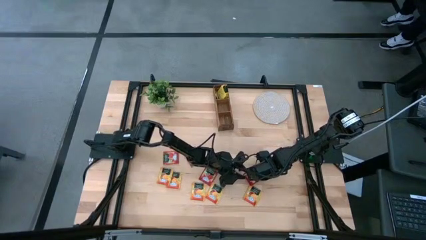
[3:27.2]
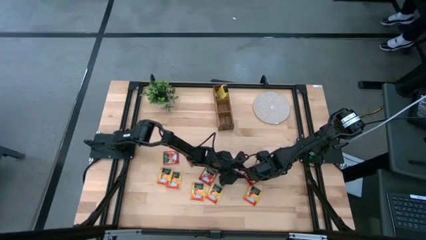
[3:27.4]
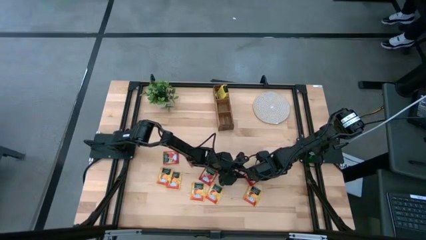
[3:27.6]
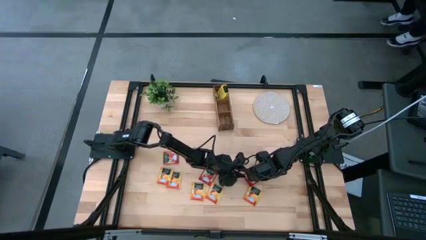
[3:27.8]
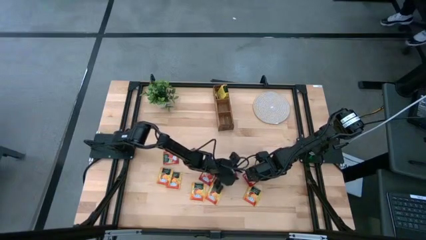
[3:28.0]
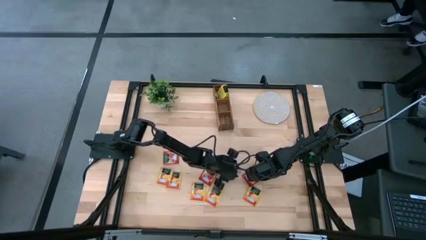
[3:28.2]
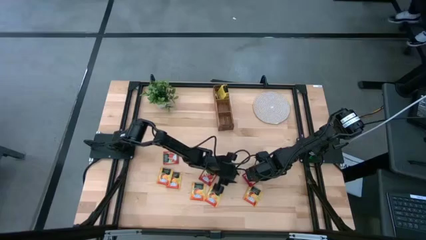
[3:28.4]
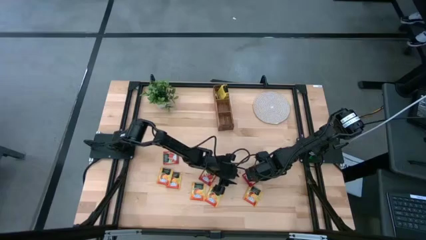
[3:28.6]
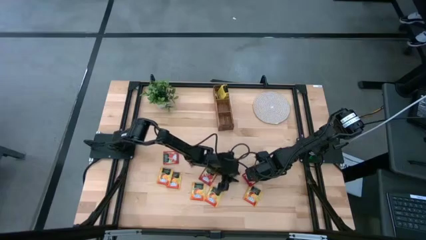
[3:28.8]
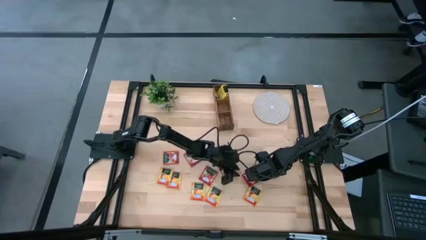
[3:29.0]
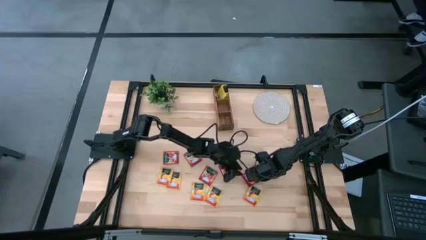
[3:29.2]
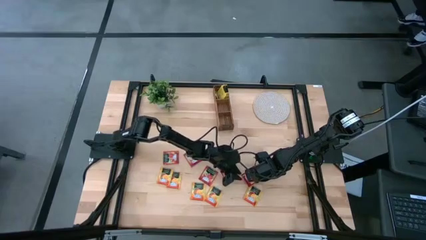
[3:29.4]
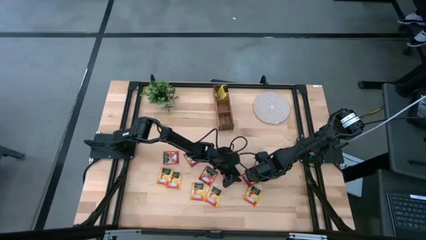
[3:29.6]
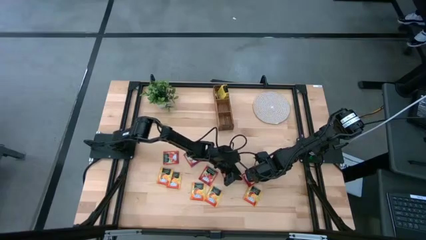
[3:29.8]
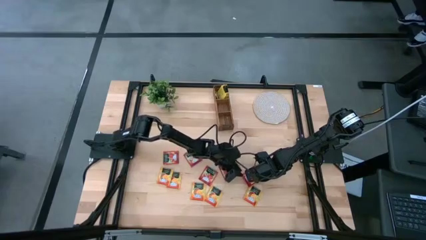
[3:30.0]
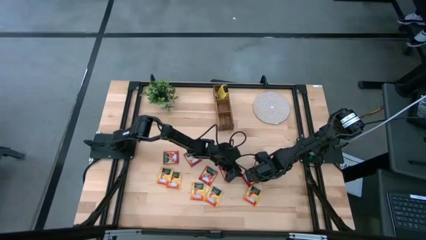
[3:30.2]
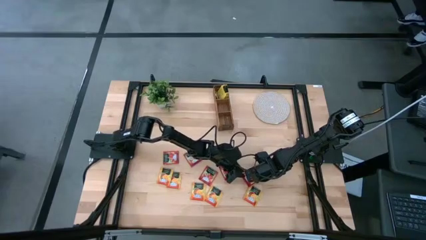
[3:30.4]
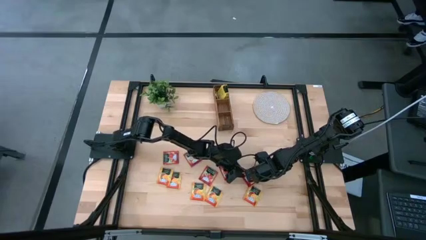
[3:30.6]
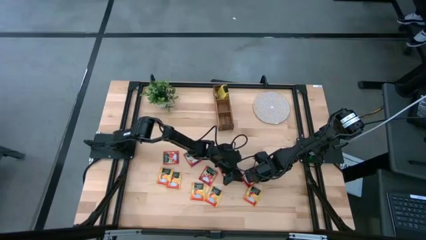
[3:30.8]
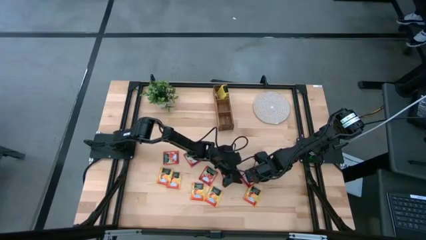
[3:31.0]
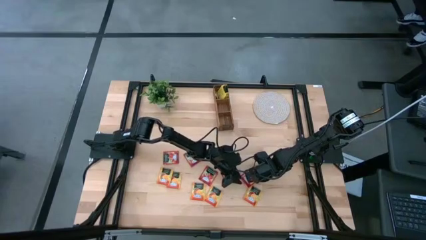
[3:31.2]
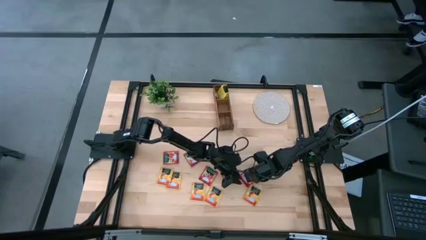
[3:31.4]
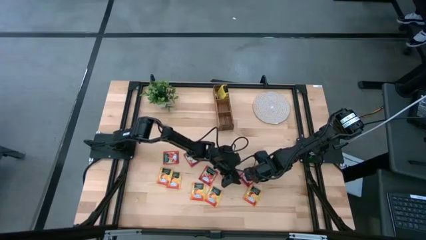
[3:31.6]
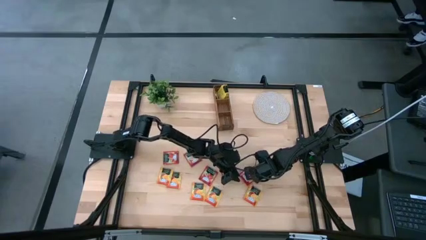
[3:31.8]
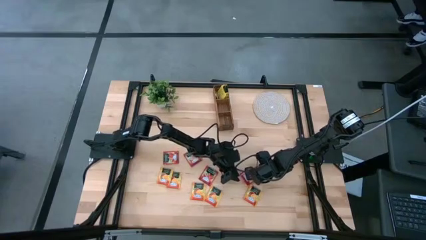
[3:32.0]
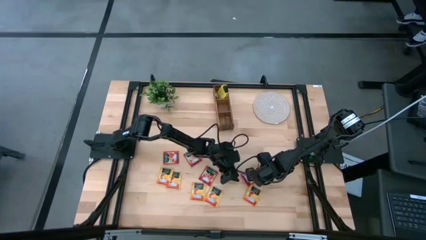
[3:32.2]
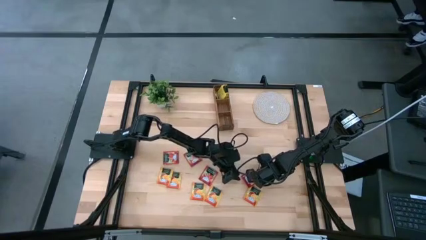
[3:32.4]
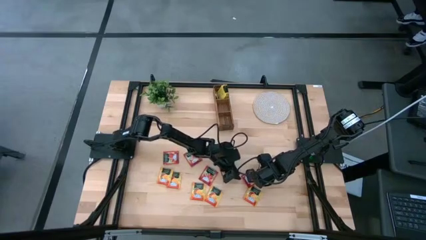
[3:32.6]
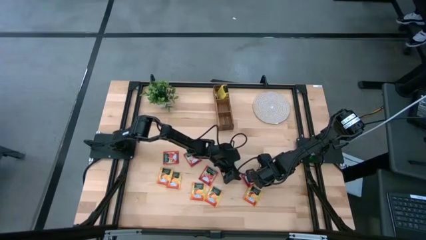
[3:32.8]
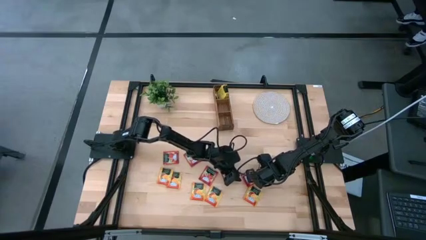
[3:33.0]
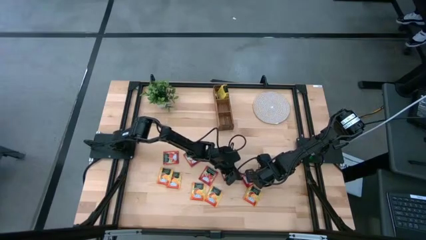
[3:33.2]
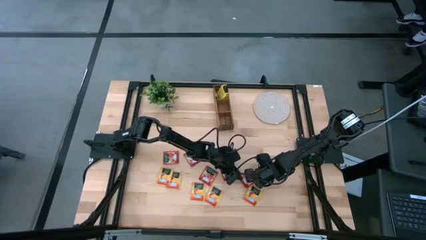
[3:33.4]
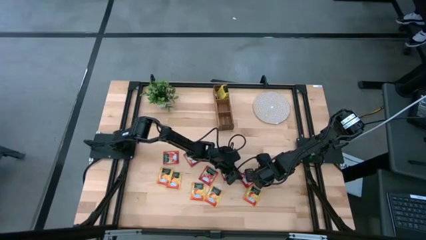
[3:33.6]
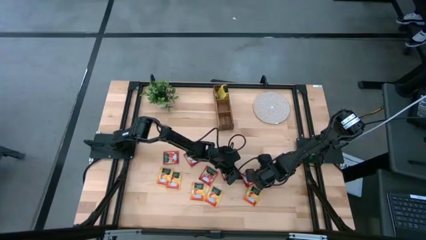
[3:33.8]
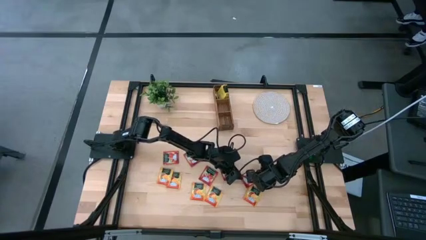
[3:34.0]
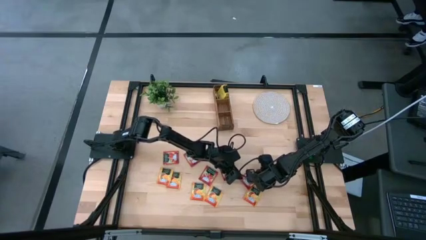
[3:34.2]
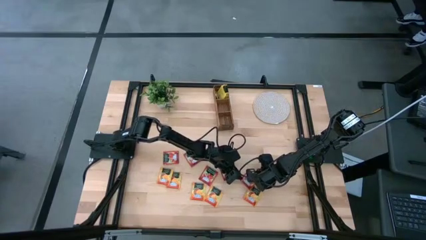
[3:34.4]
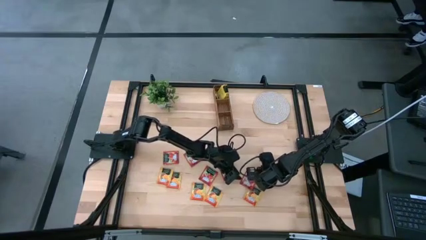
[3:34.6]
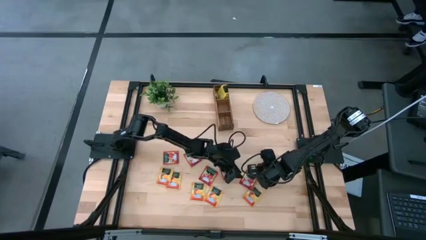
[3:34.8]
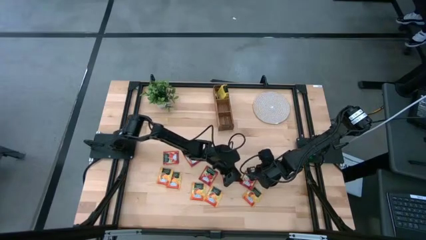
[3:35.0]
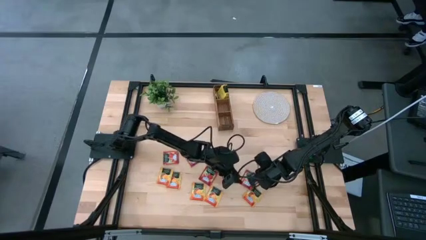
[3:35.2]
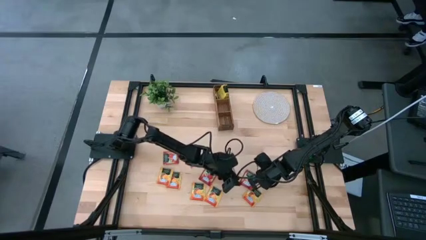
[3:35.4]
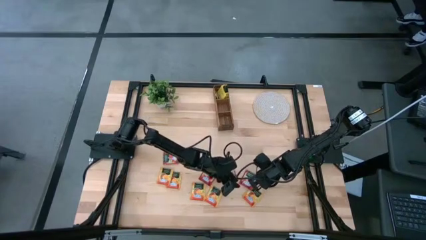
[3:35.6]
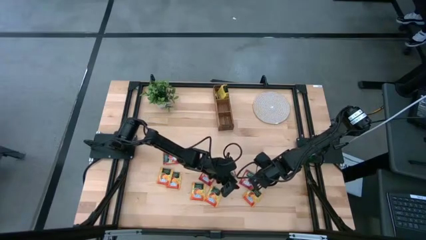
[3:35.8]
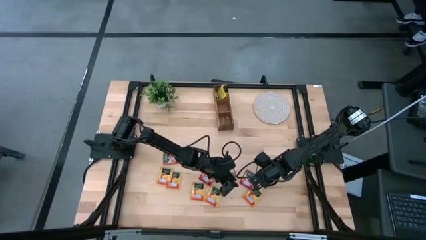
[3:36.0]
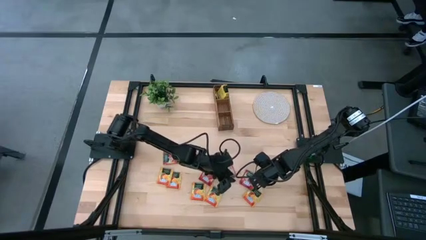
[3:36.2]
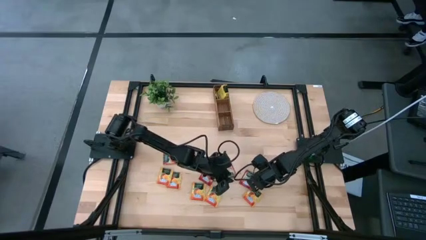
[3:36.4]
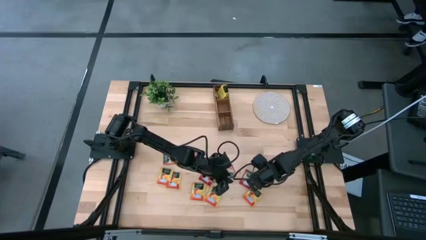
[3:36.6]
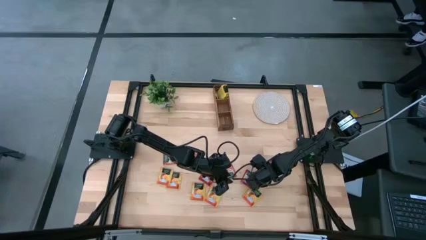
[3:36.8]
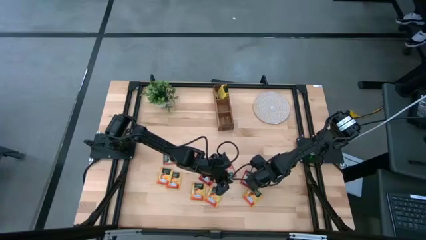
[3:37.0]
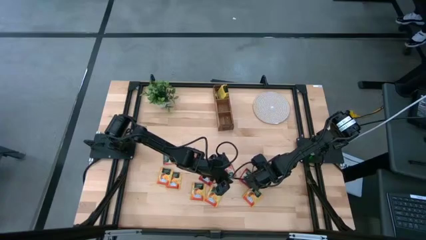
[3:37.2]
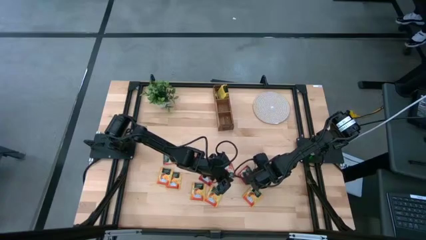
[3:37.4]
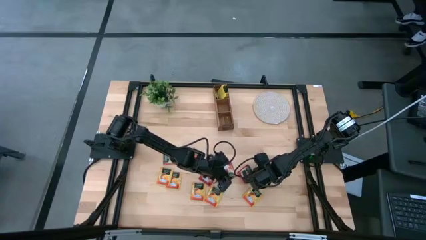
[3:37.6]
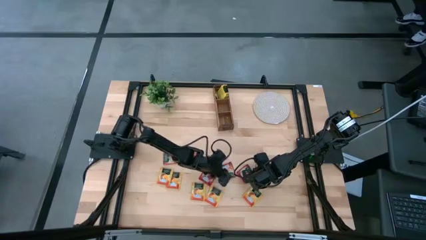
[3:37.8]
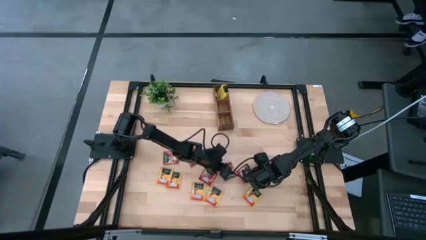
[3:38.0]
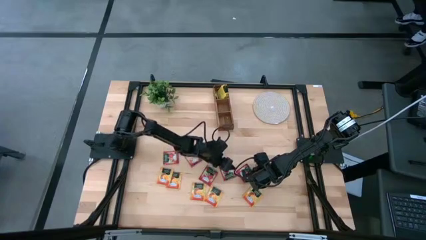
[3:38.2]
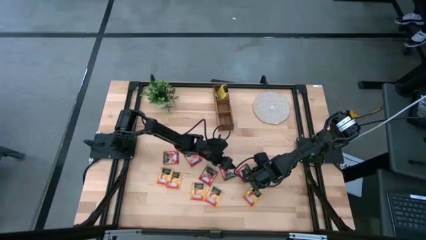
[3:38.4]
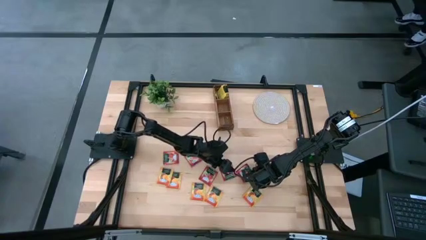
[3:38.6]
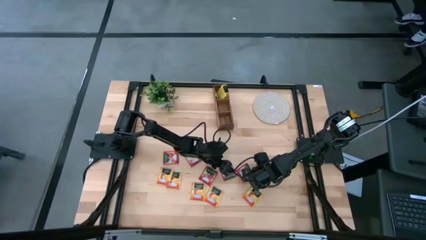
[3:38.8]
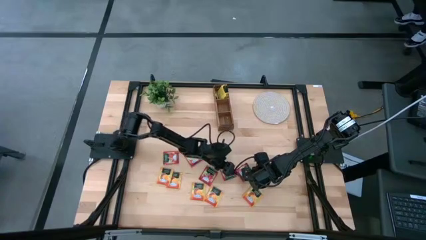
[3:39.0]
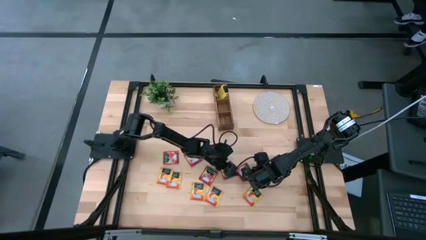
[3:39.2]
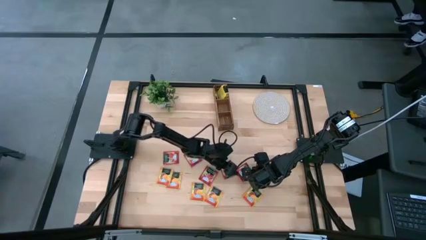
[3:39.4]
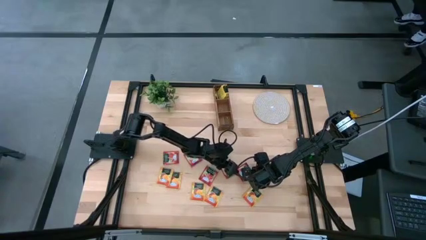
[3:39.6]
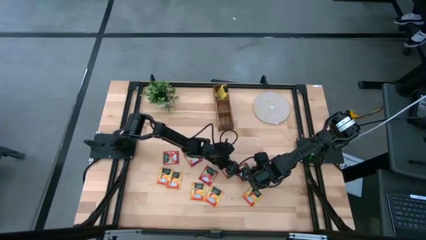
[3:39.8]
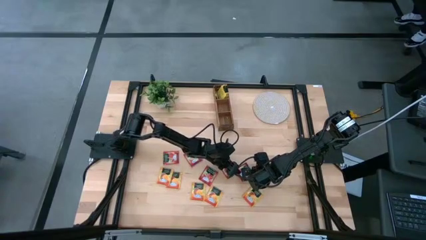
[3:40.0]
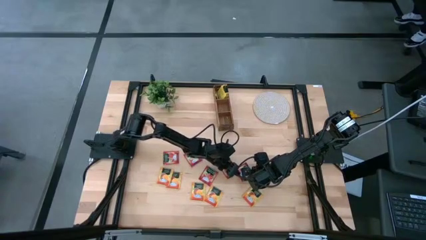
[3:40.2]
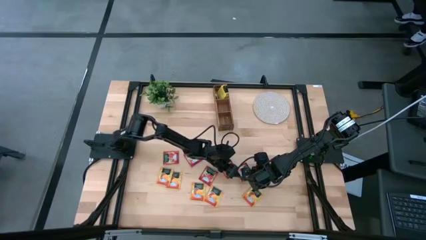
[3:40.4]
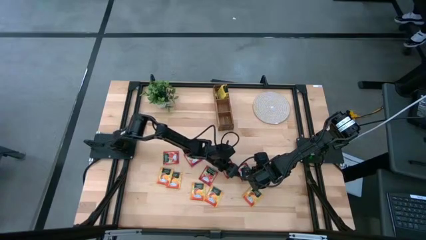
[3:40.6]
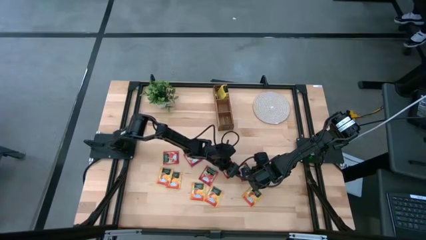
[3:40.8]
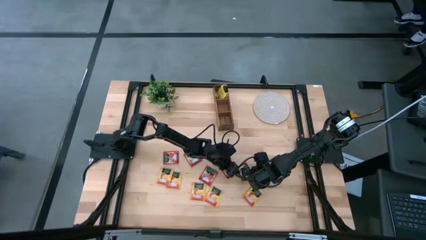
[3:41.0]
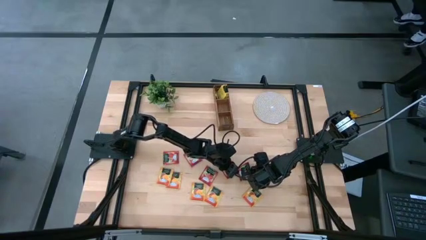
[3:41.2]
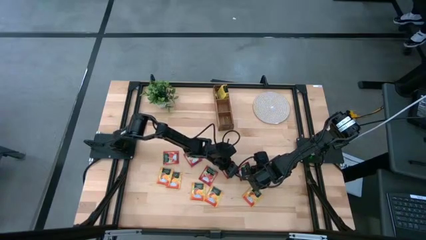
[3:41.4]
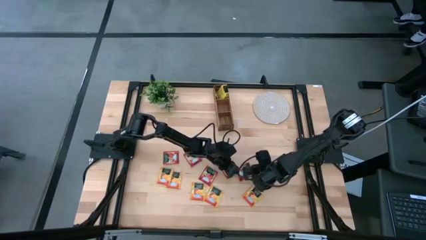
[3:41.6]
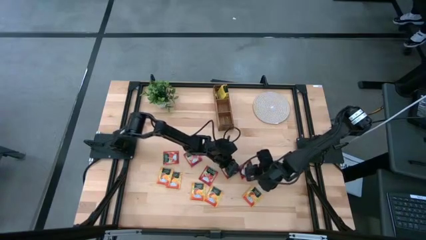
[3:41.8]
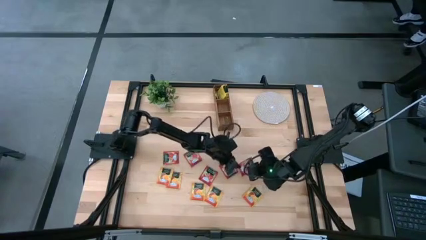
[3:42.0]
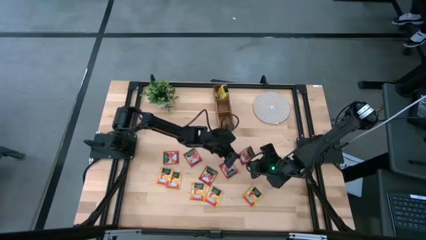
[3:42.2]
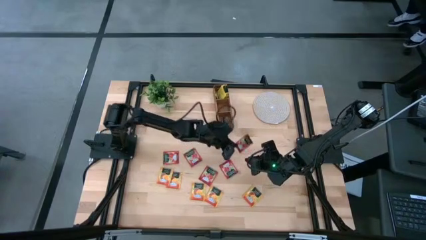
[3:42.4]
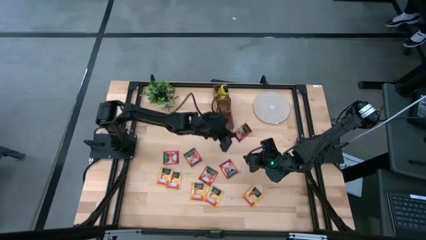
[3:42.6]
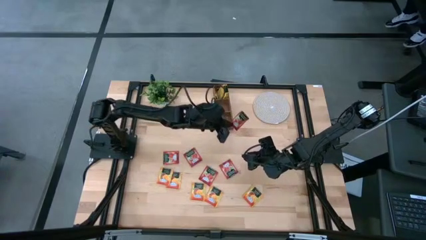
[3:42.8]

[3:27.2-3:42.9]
Task: Pick & Place Tea
Put the red tea bag into the middle section of the wooden organizer

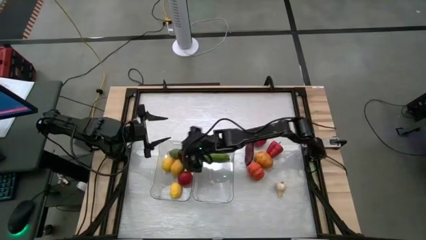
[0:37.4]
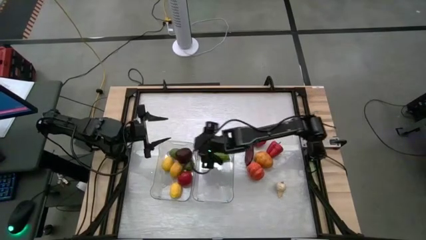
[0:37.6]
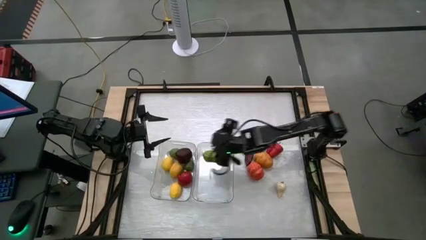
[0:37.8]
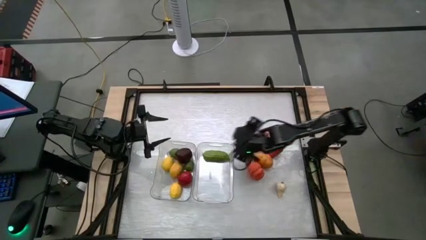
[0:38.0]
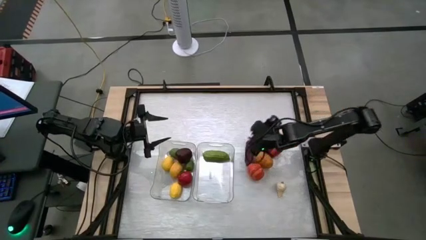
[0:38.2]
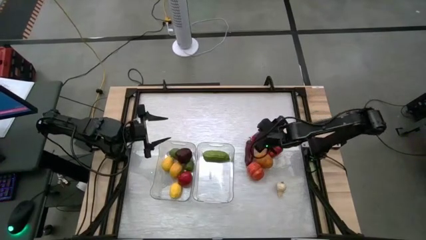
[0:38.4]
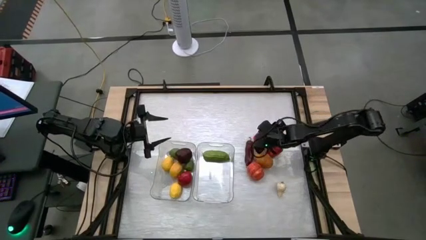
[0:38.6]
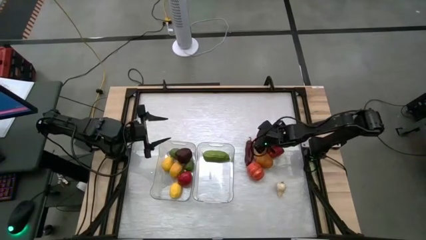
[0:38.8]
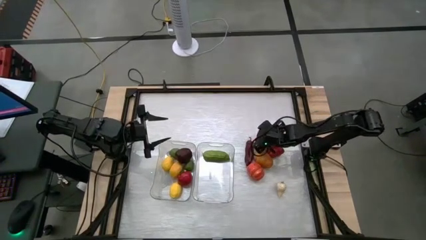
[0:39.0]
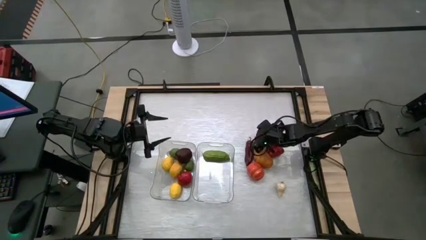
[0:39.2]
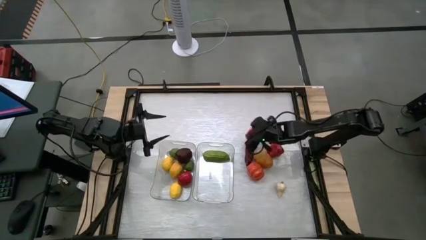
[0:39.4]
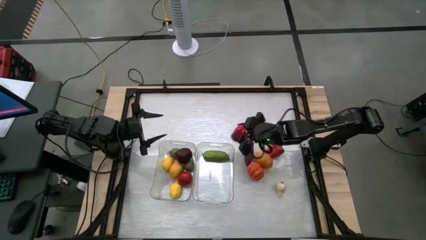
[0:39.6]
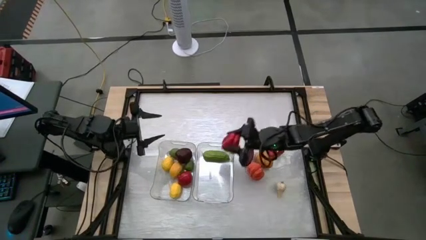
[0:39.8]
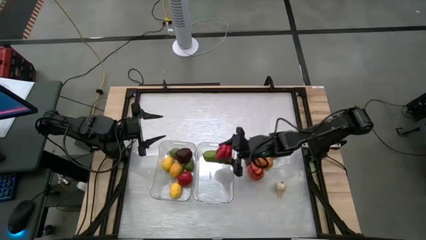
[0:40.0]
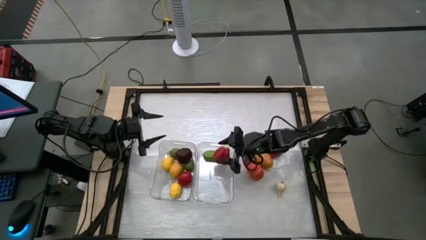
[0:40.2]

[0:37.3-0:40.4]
Task: Sort produce into baskets
Put the top red bell pepper into the right transparent bin
